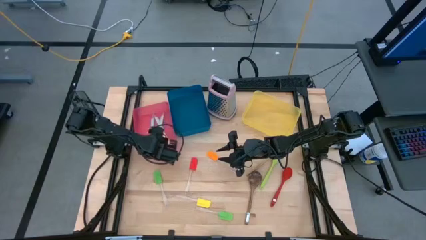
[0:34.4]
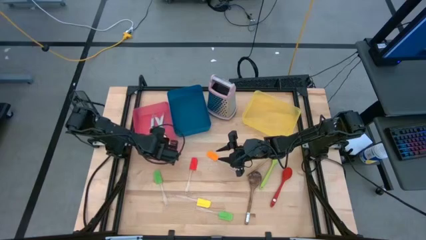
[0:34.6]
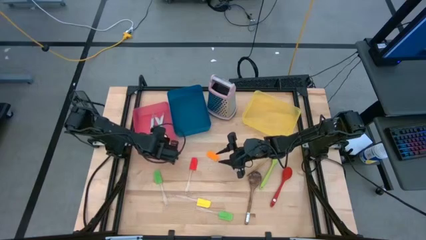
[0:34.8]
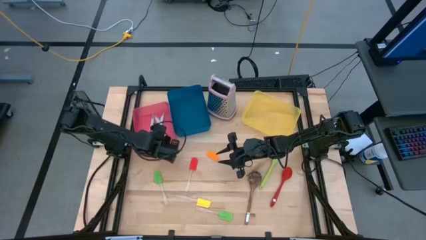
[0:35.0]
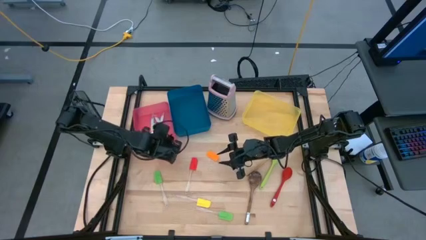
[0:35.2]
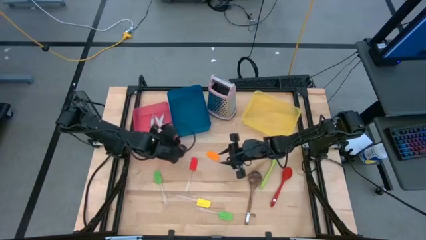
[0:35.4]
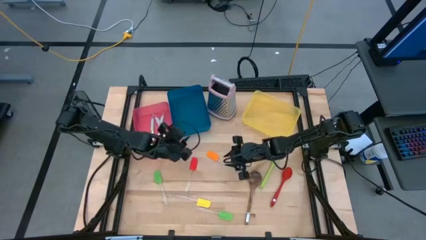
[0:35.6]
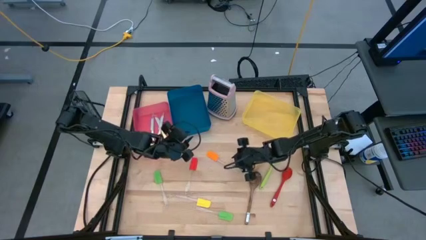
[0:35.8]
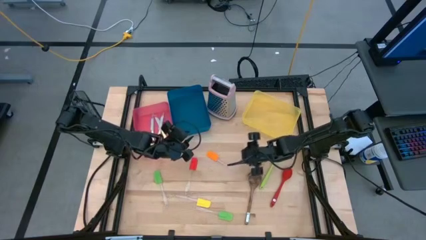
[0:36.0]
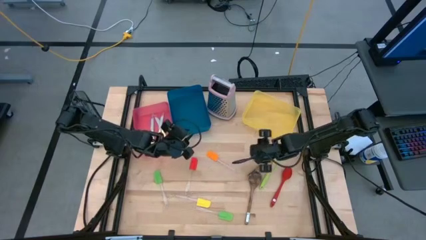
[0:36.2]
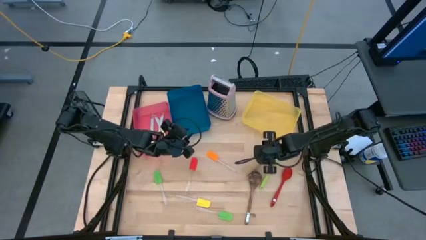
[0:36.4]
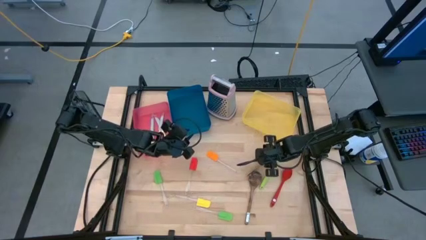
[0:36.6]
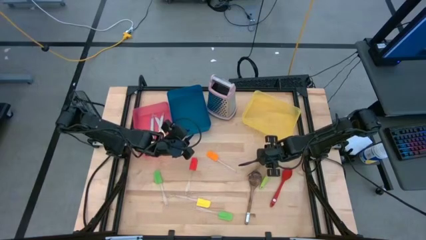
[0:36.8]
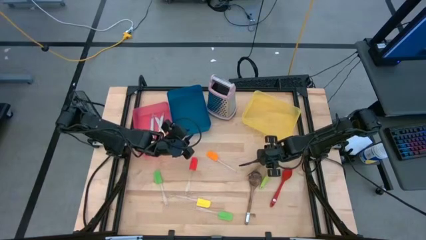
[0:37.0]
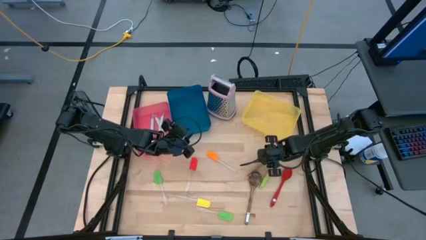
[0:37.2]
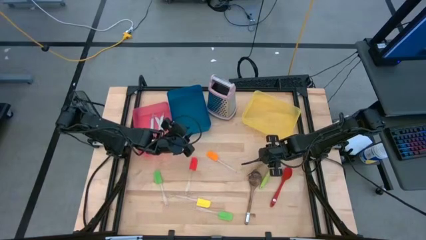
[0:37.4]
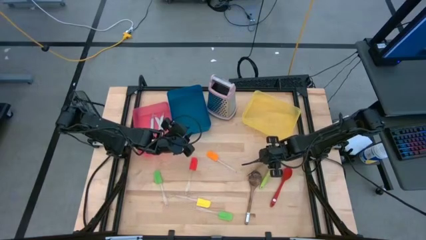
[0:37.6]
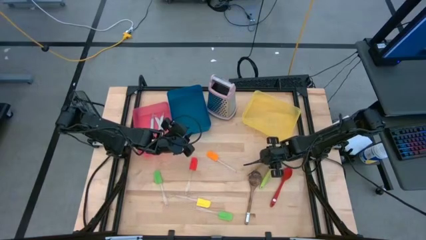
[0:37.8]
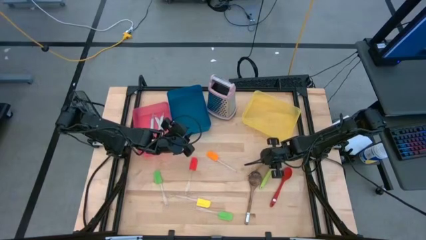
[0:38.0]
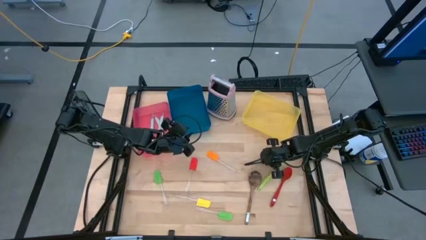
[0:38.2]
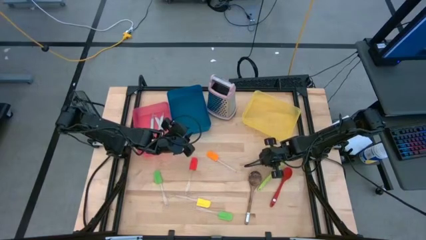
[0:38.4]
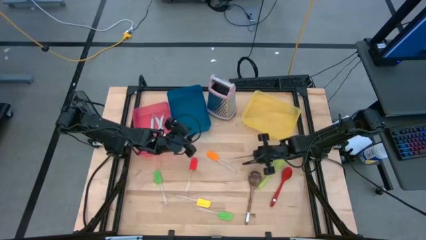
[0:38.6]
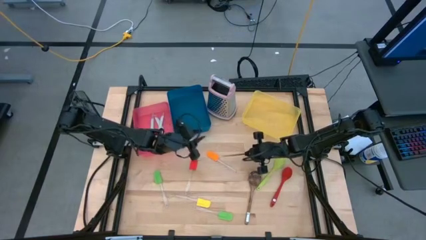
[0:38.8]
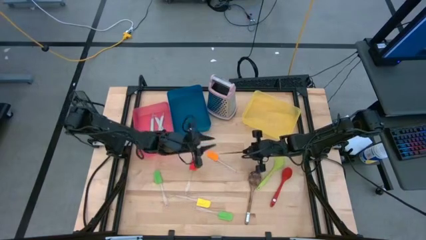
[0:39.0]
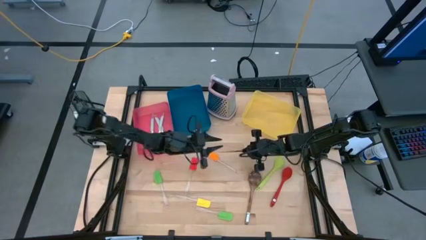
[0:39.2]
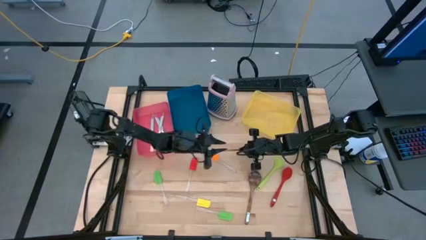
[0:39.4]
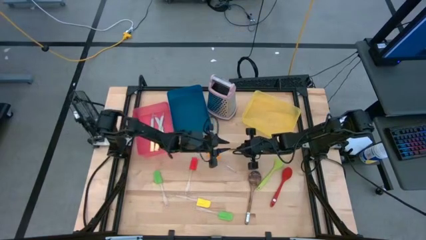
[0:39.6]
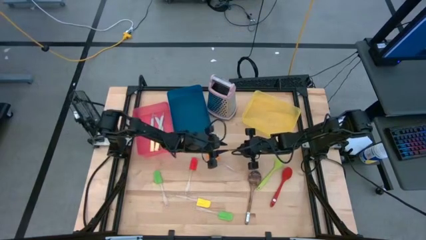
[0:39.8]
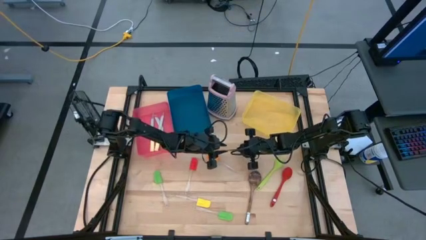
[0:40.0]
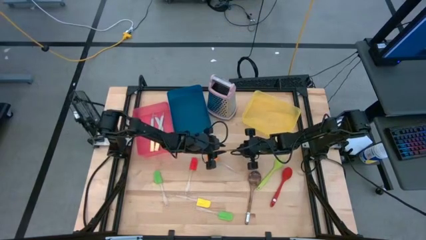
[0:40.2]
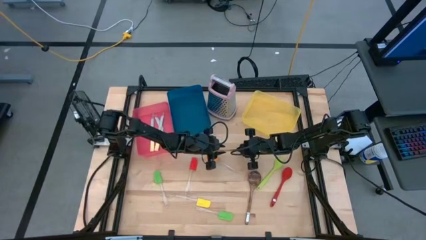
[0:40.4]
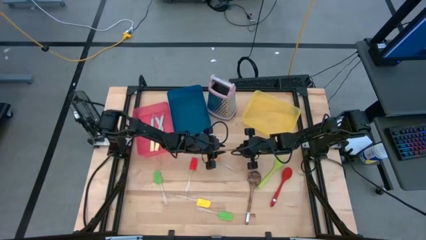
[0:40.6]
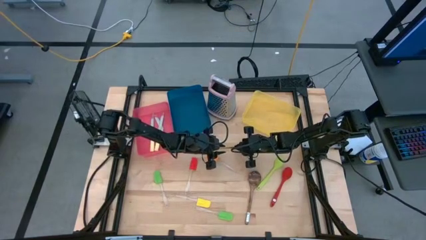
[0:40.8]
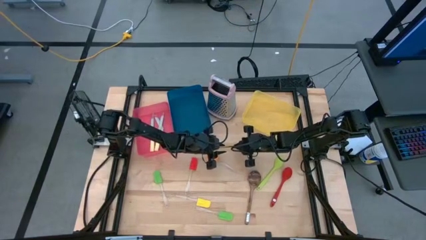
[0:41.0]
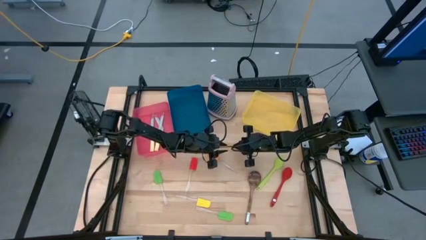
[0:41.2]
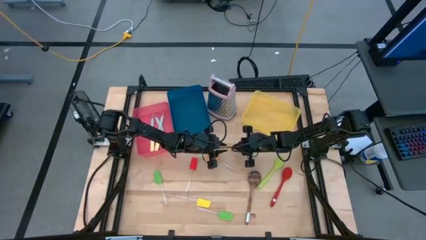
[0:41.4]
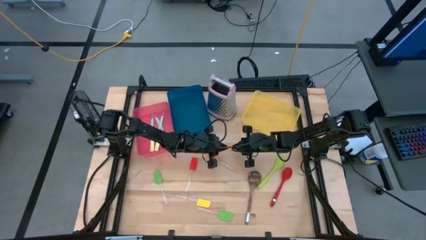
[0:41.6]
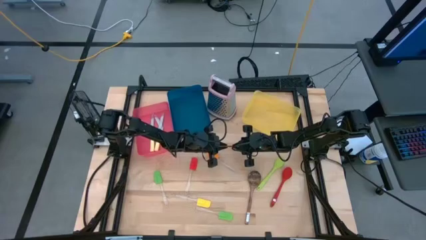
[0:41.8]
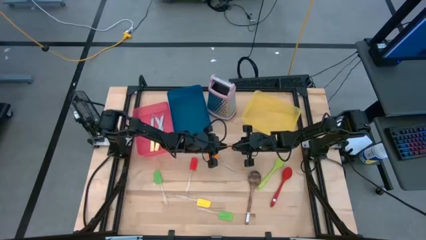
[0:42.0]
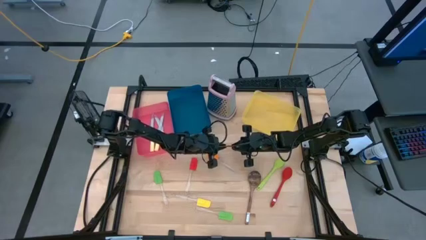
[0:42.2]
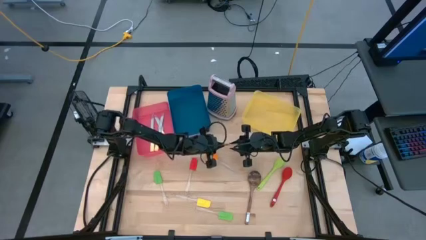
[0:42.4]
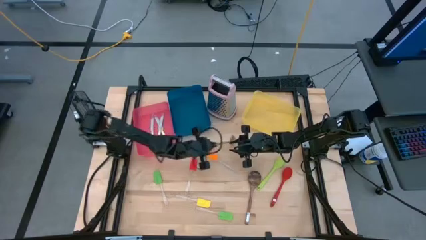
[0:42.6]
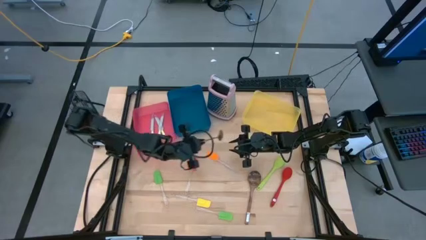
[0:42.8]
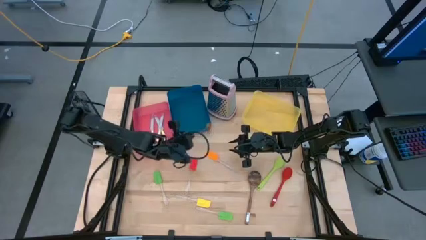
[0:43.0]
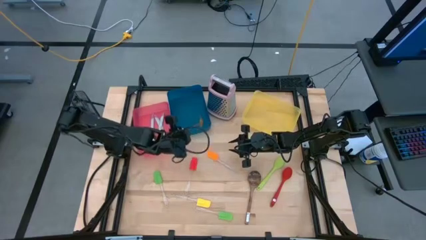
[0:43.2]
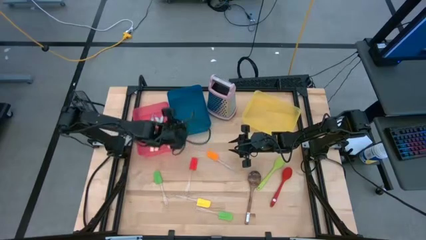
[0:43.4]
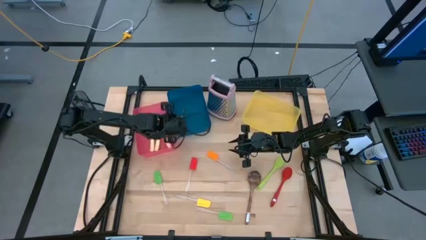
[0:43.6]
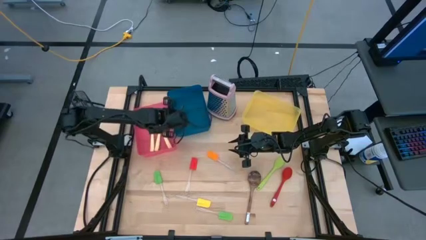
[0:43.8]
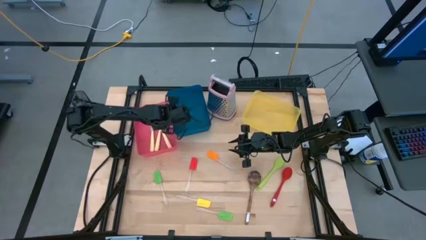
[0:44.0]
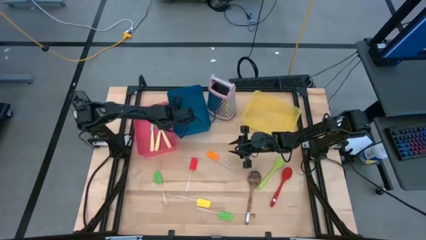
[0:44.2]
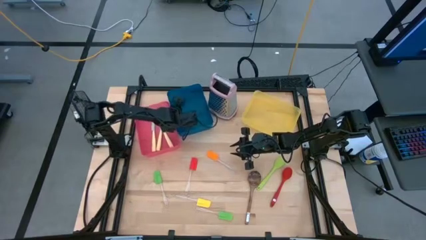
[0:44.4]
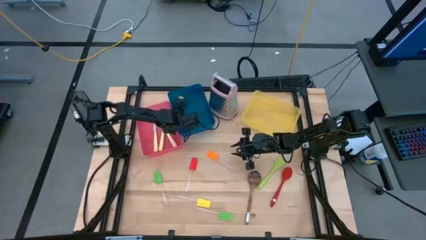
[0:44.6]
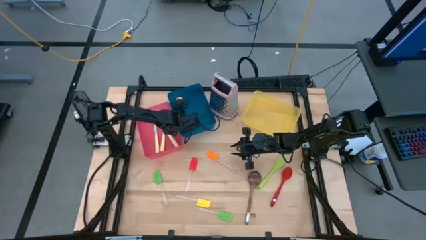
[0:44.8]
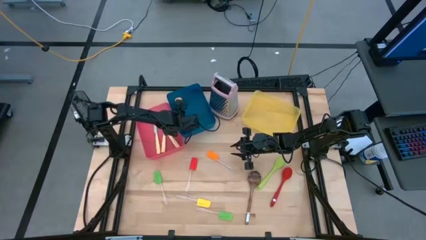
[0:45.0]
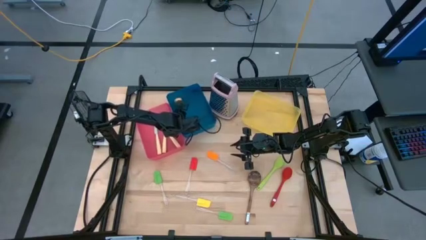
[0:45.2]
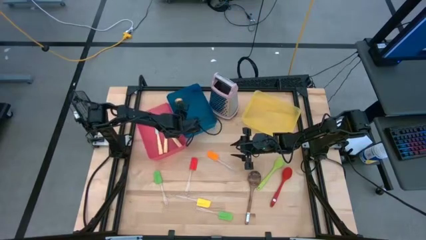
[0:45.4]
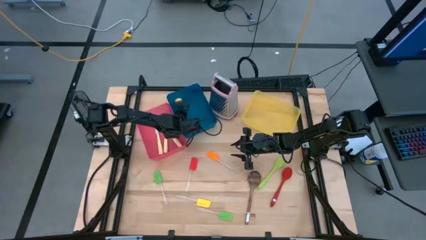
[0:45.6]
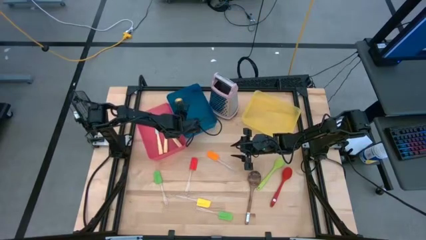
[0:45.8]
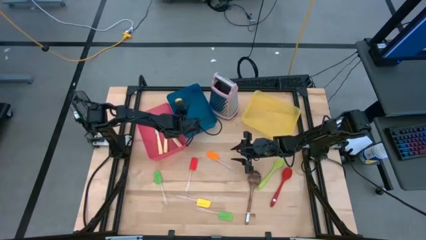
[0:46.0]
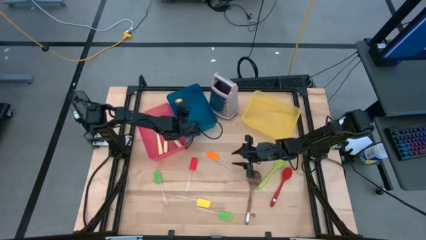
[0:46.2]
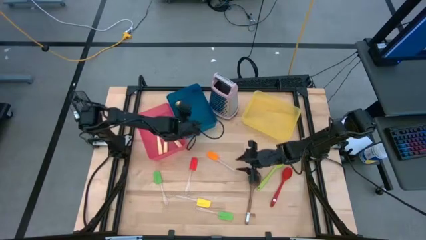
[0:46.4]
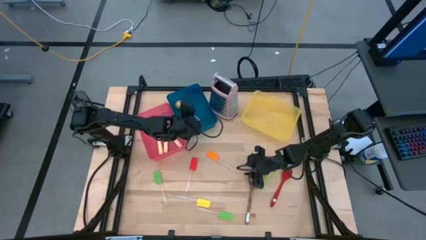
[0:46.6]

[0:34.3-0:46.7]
Task: Pick & Place Kitchen Items
Put the gold spoon into the blue bin
